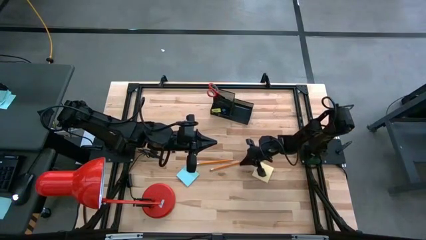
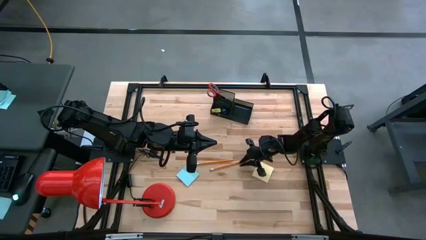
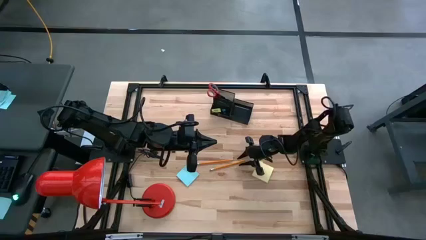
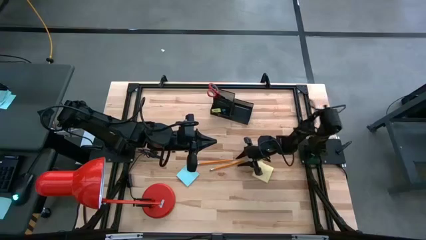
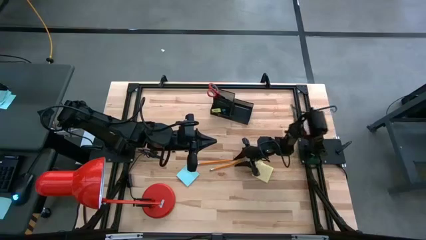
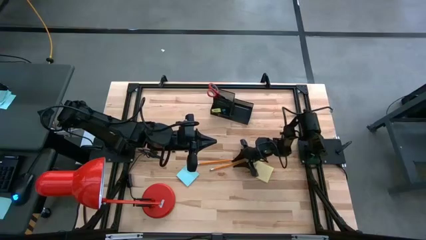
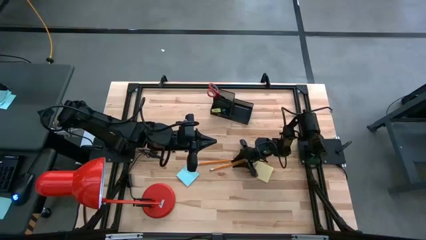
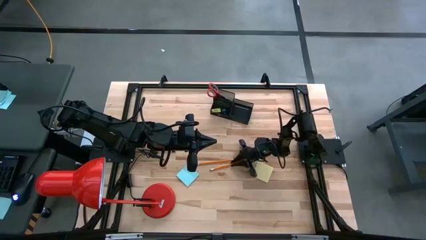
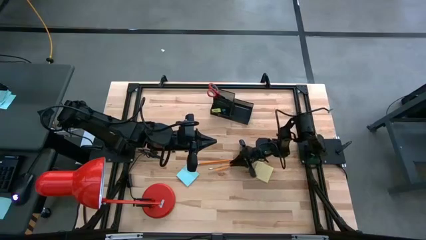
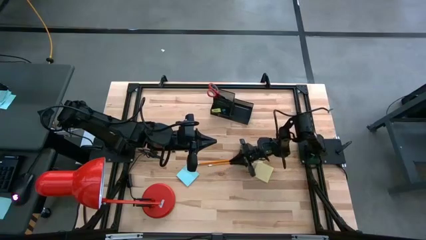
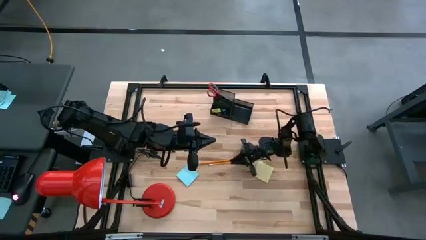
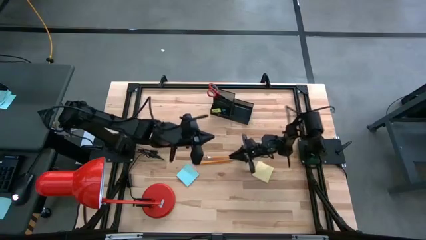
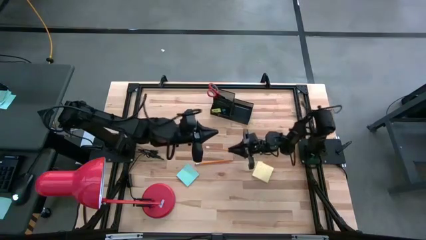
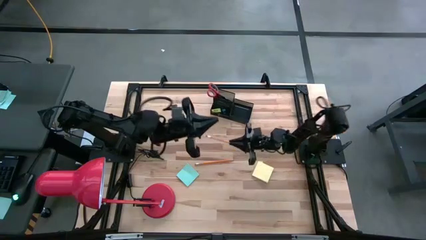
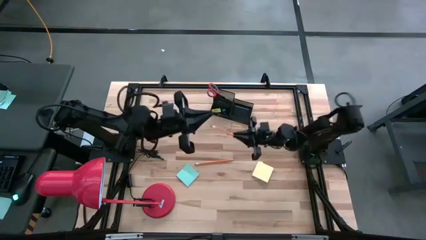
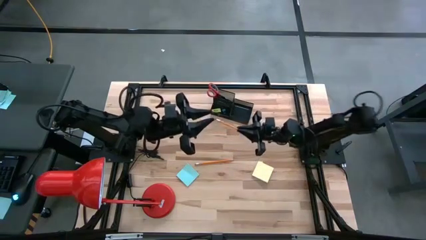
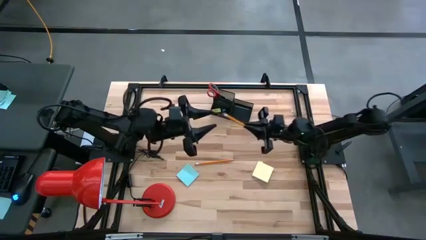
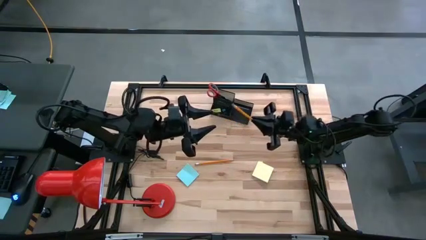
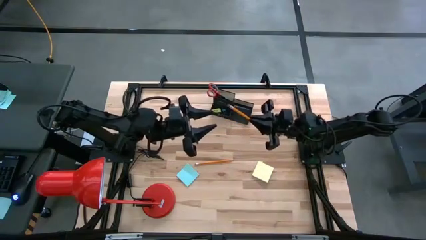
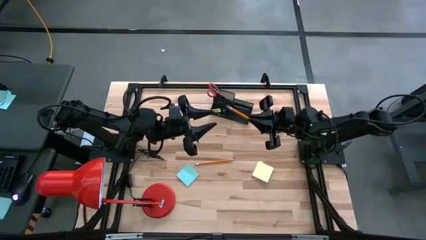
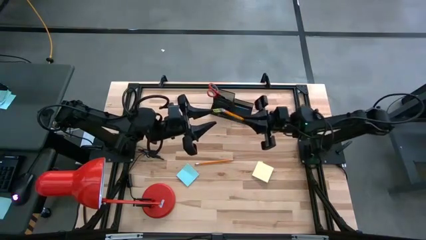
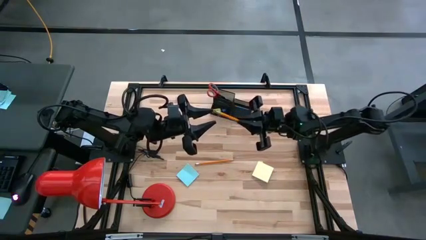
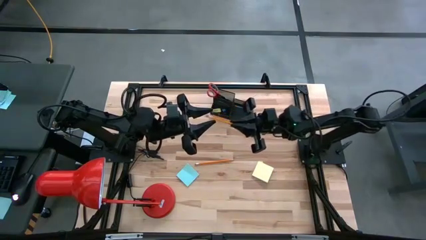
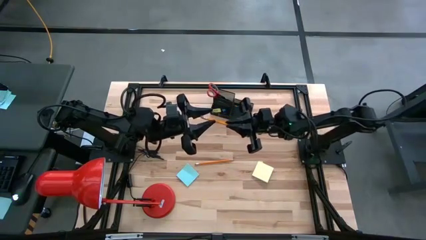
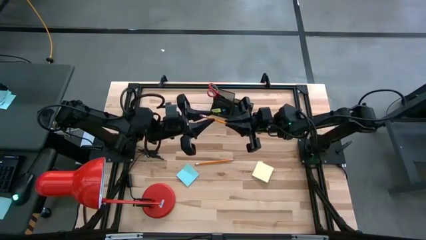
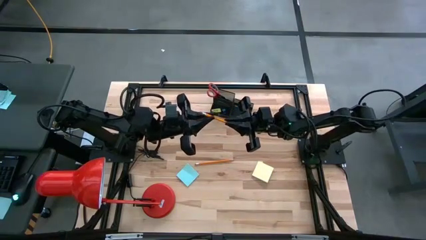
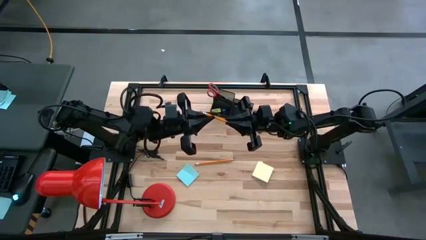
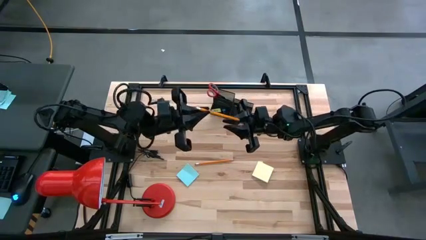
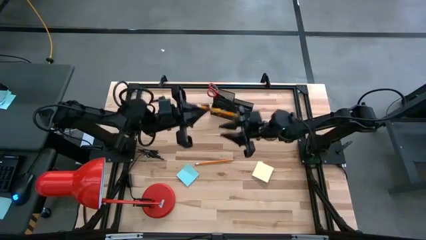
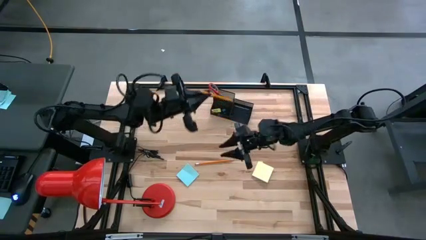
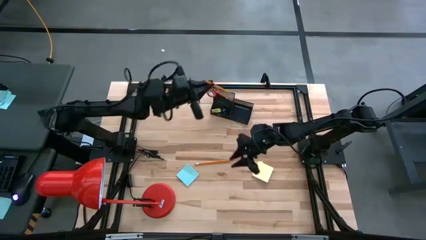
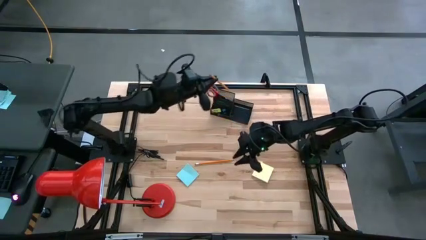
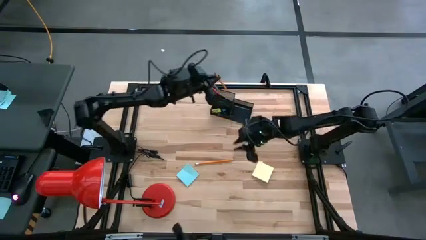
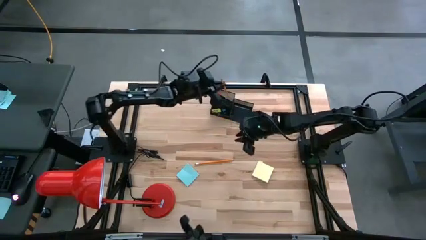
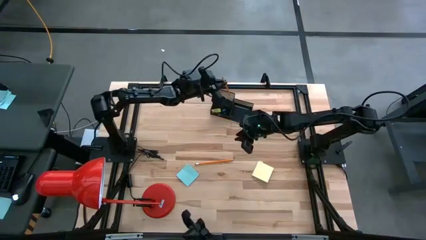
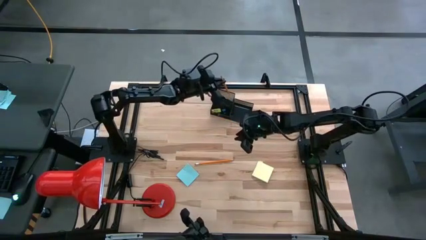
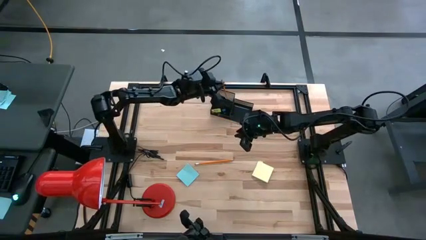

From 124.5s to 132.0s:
Task: Pick and place office supplies into organizer
Put the bottom yellow pencil in the black desk organizer

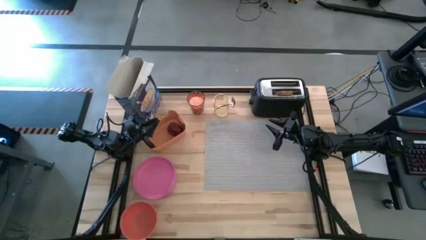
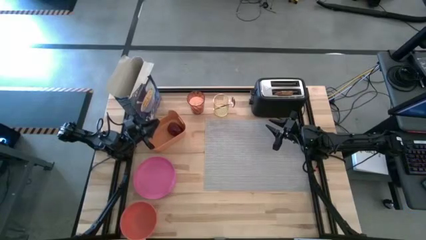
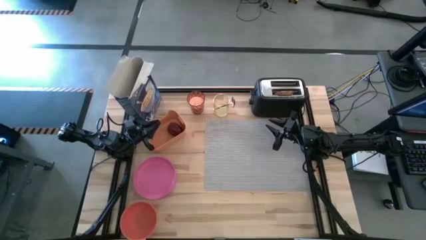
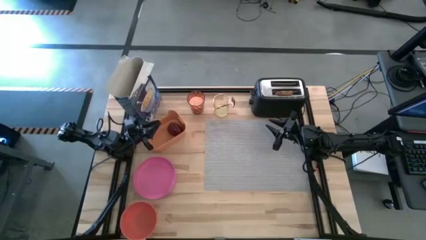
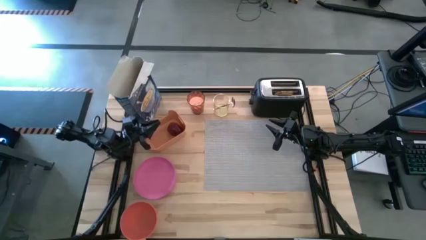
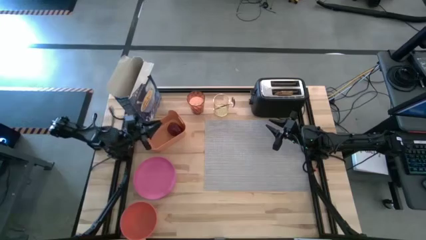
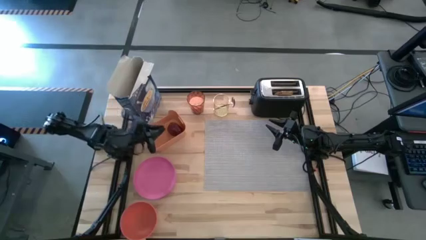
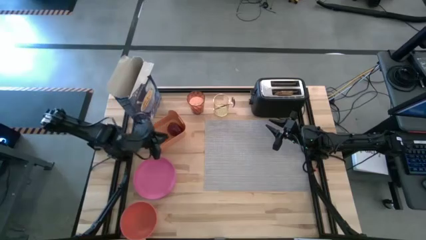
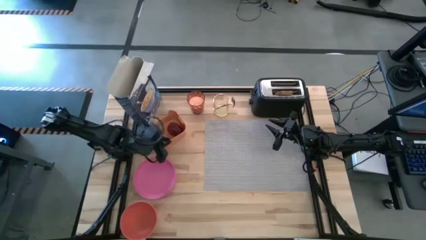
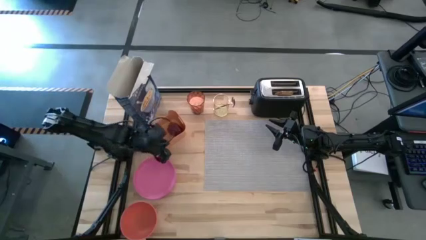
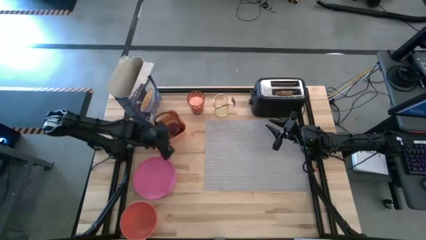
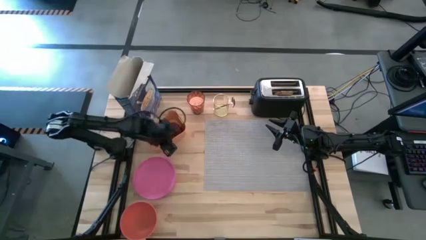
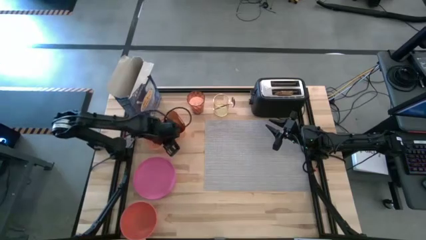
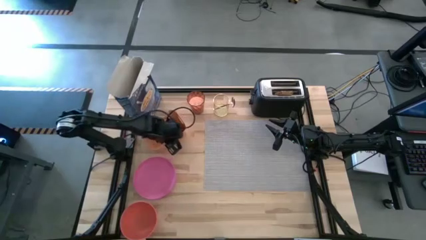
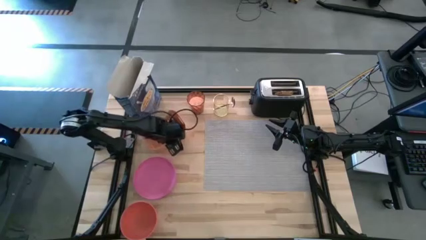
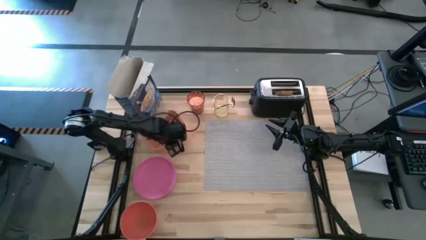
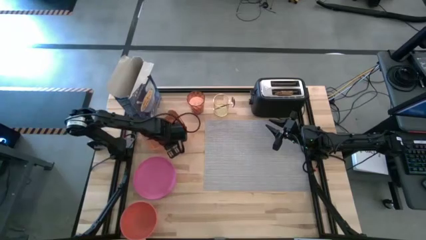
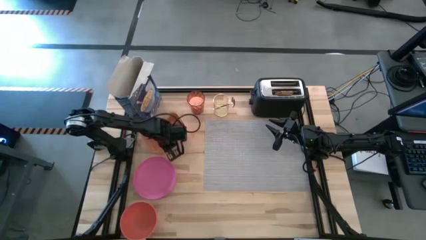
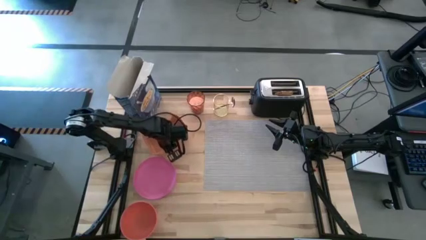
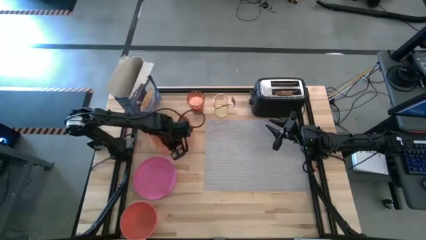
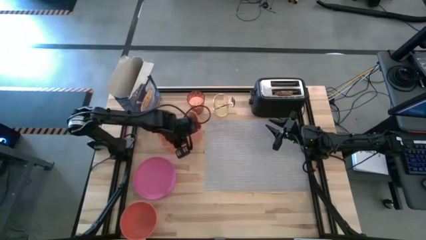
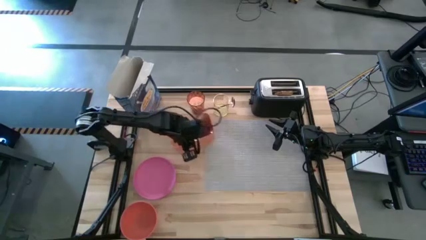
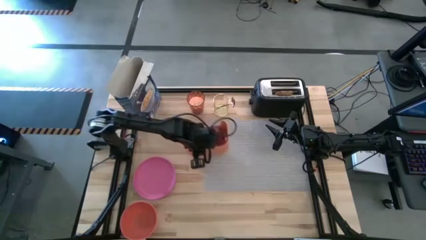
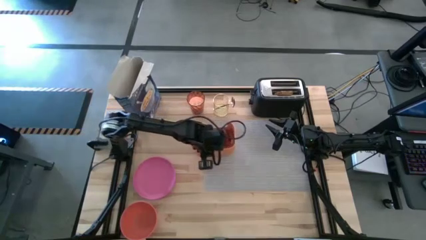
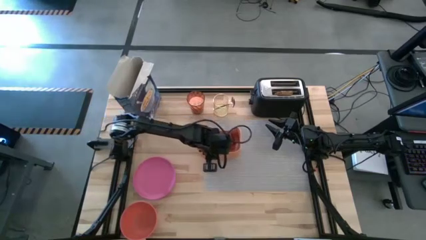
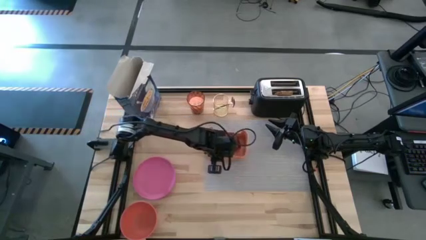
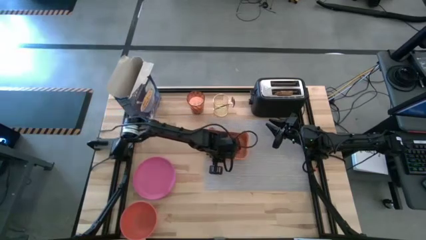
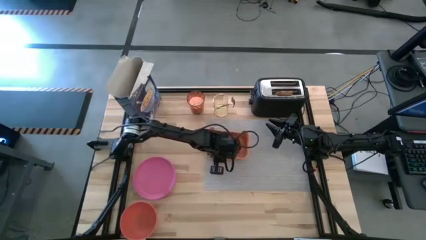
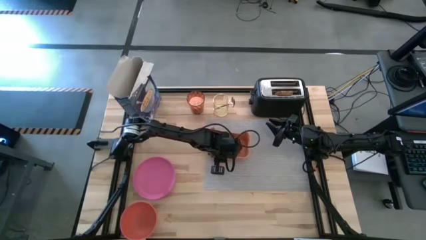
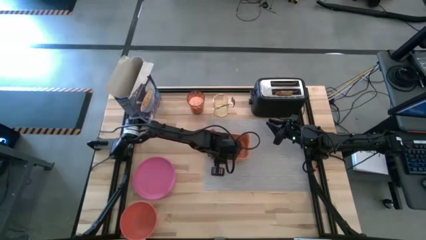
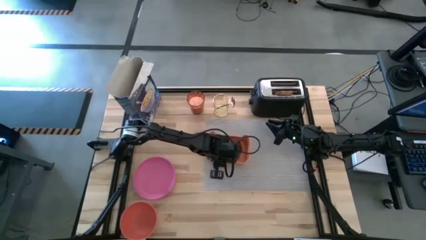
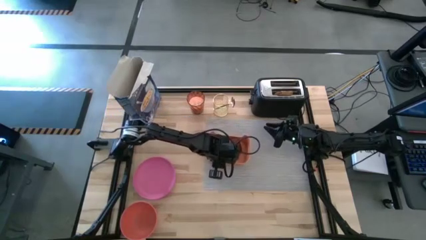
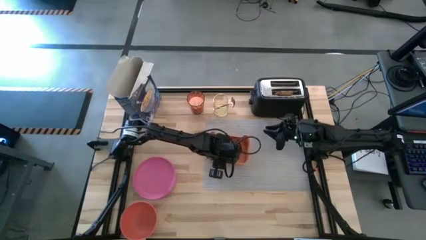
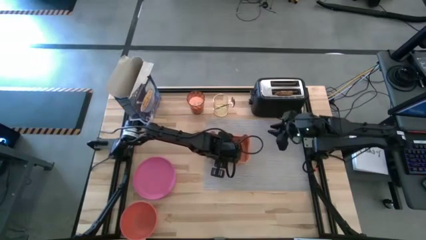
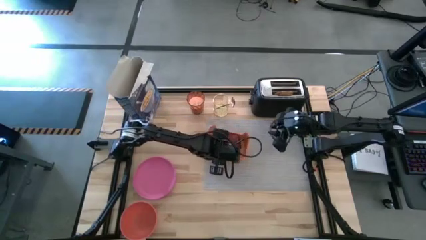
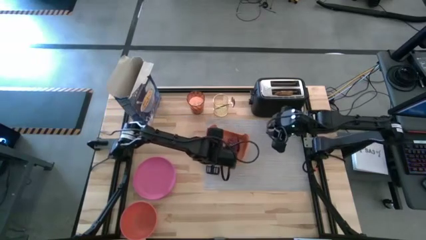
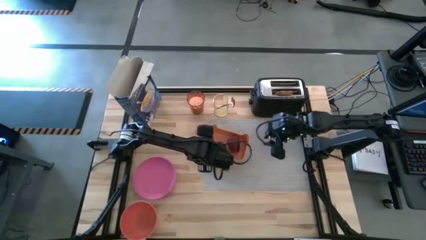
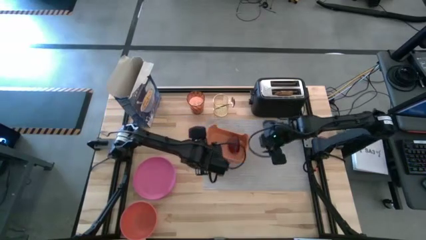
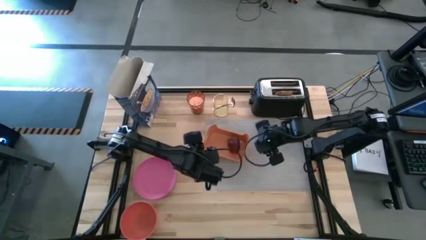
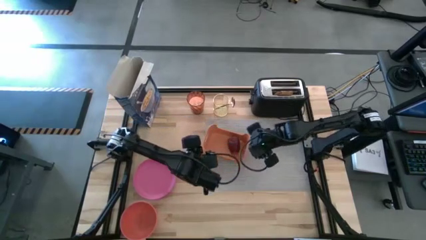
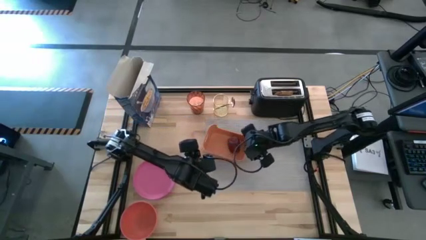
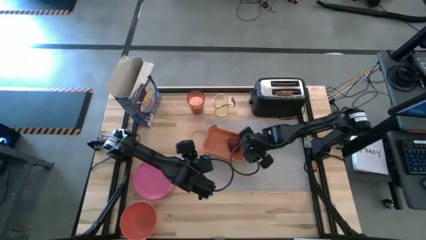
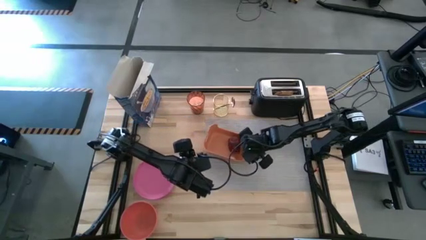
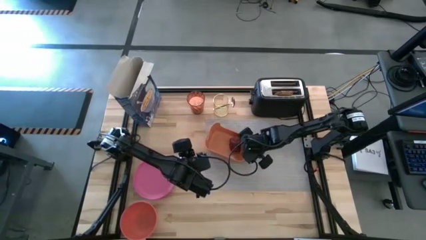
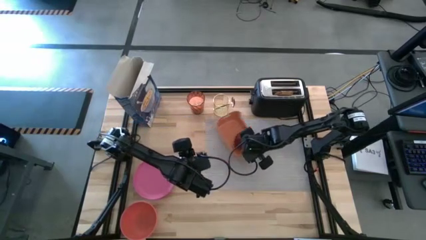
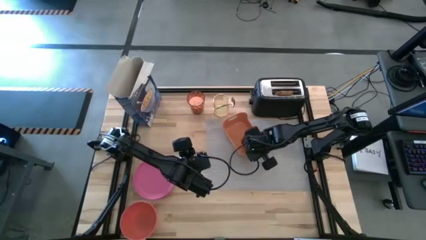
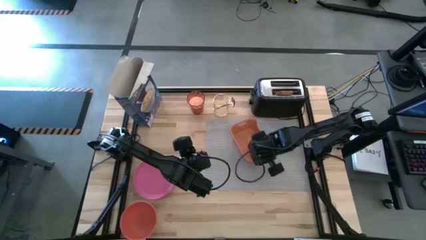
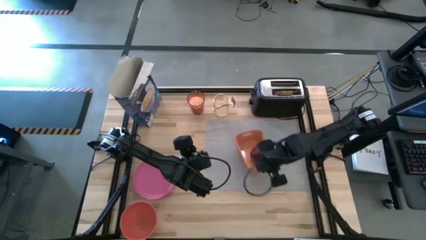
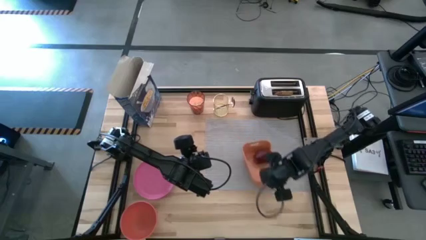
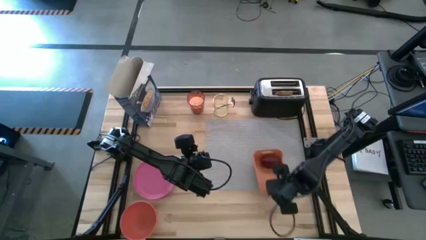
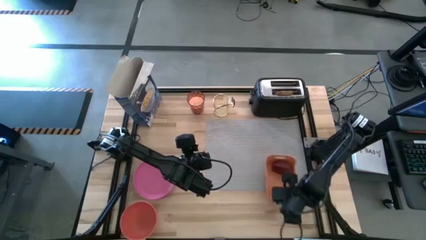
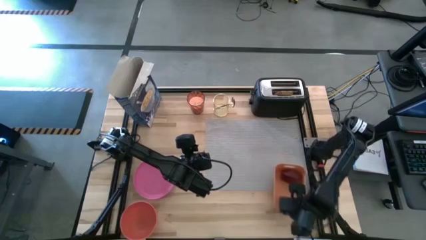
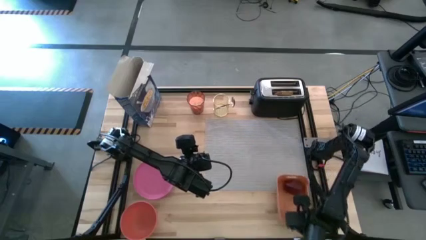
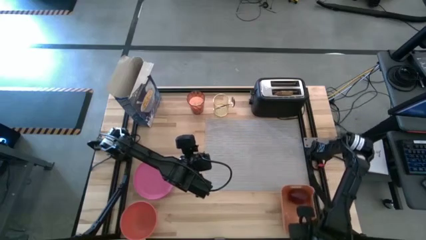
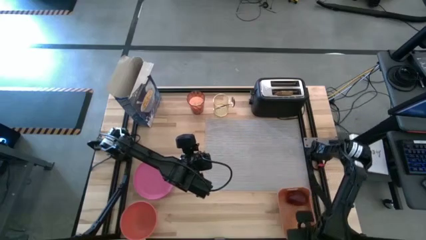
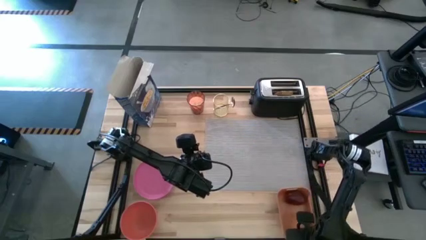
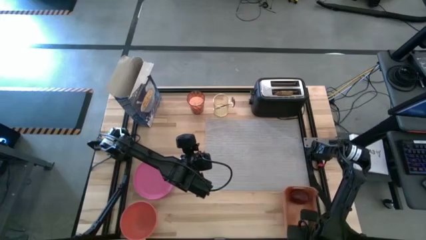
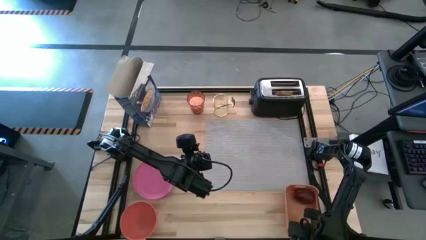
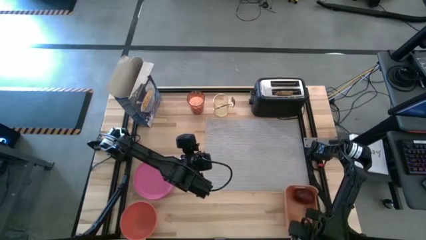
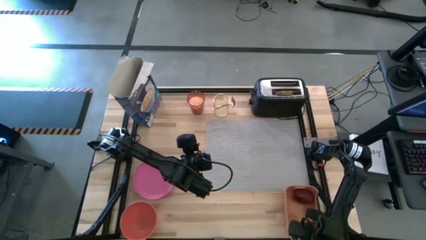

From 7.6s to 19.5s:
Task: Arrange a breakfast setting
Move the orange bin to the bottom right of the table
